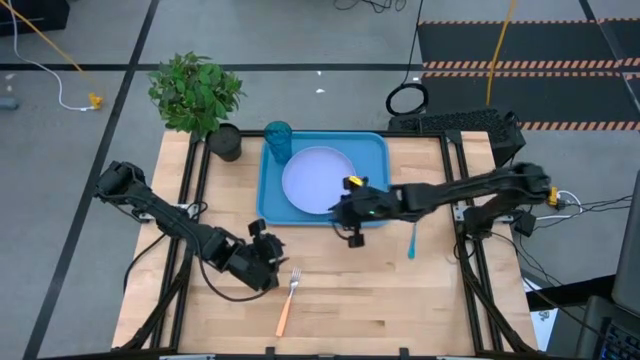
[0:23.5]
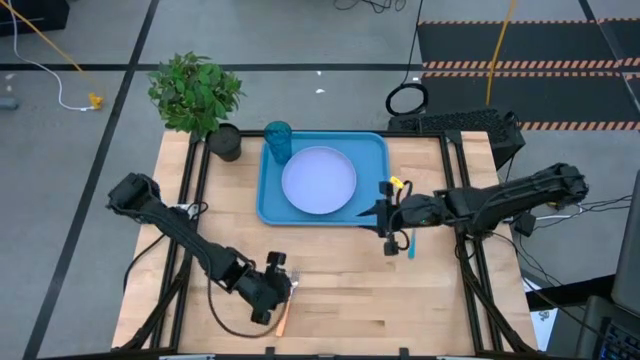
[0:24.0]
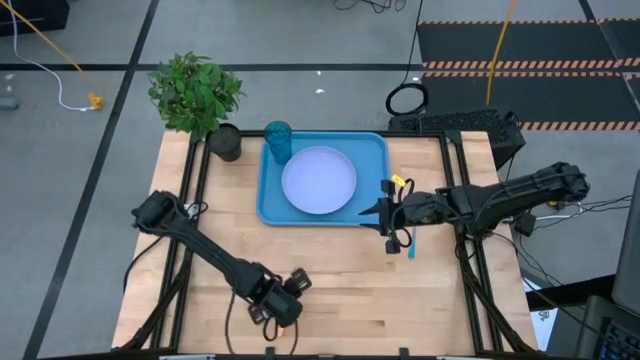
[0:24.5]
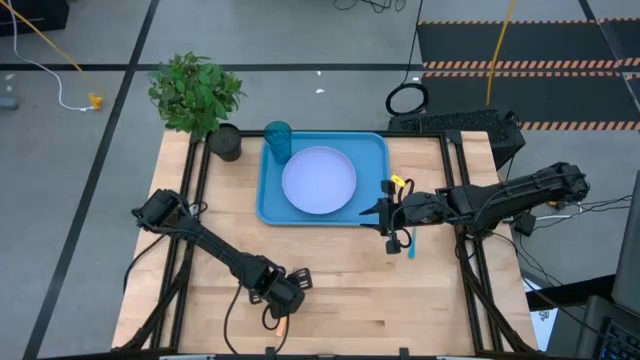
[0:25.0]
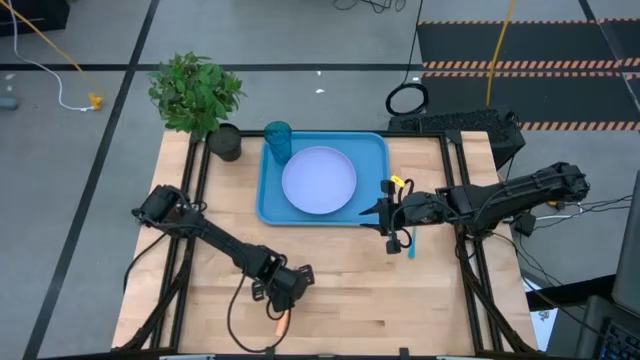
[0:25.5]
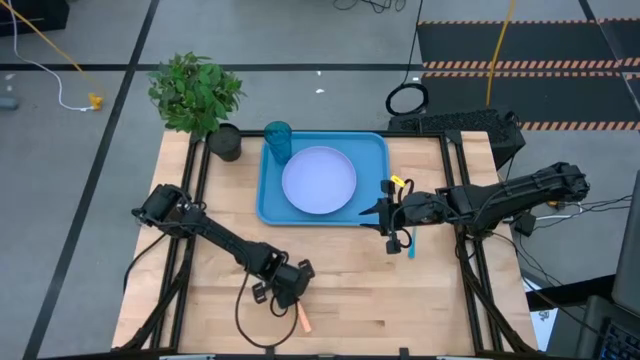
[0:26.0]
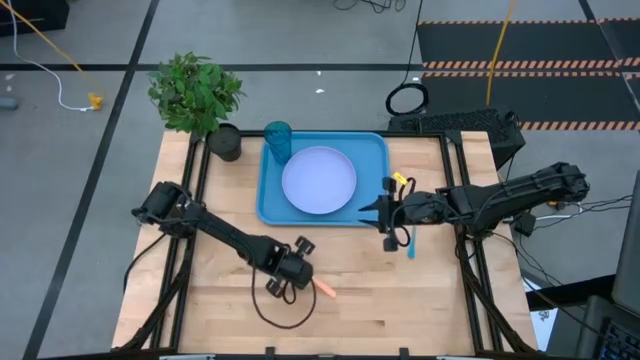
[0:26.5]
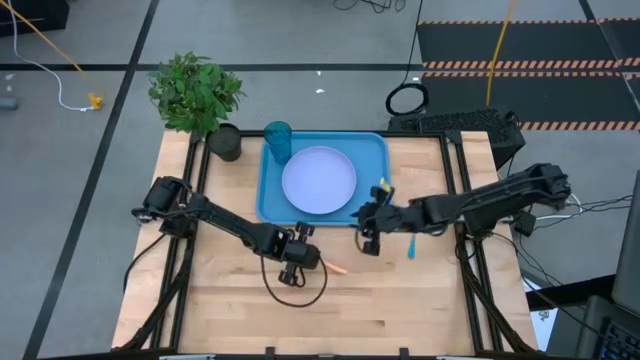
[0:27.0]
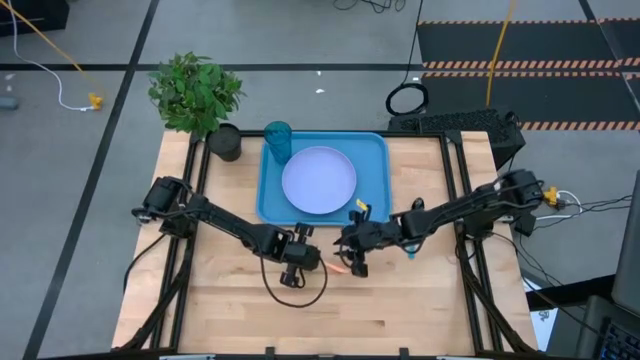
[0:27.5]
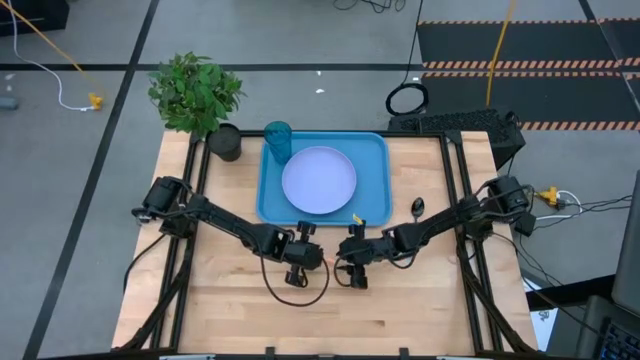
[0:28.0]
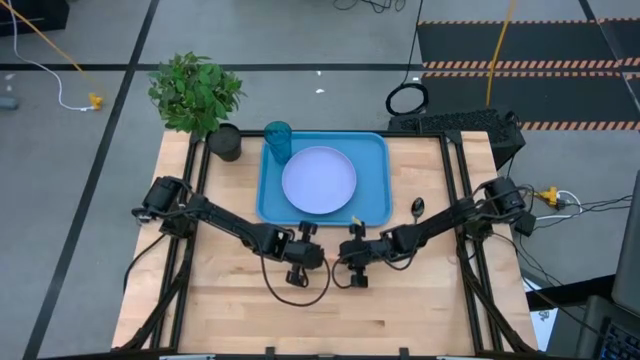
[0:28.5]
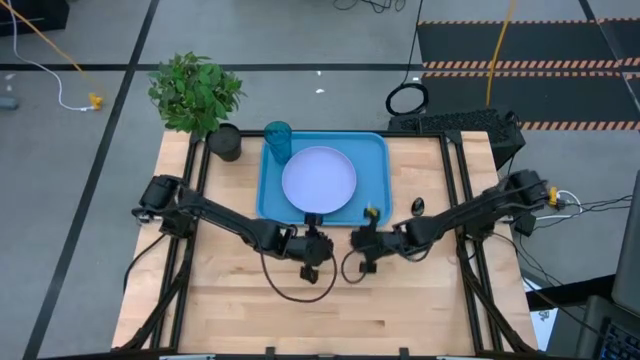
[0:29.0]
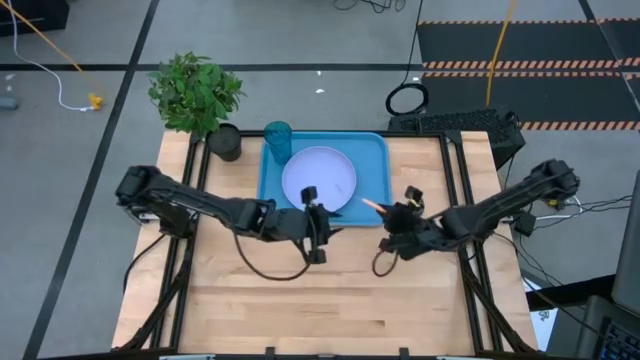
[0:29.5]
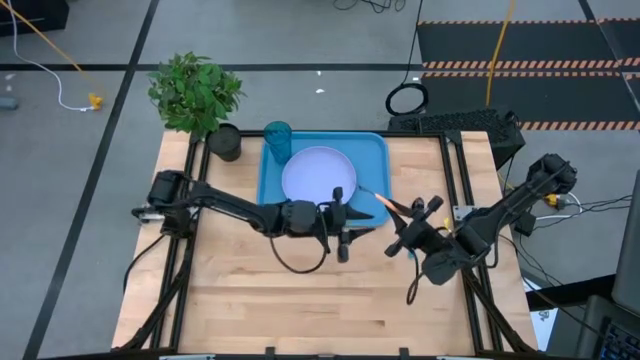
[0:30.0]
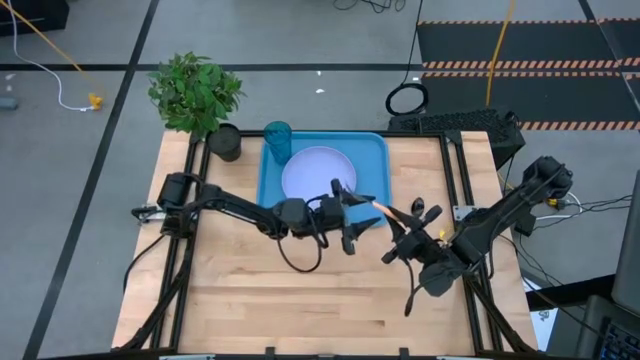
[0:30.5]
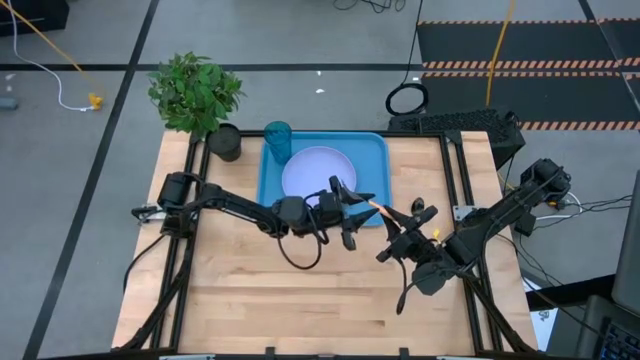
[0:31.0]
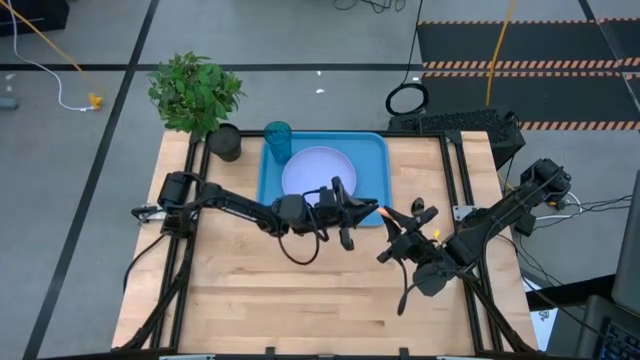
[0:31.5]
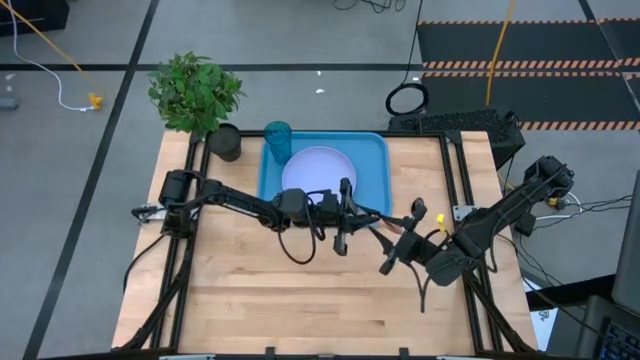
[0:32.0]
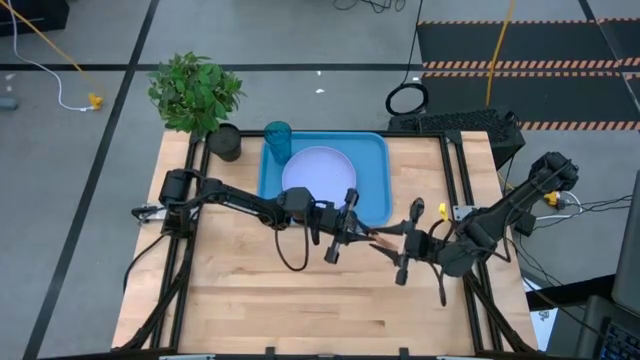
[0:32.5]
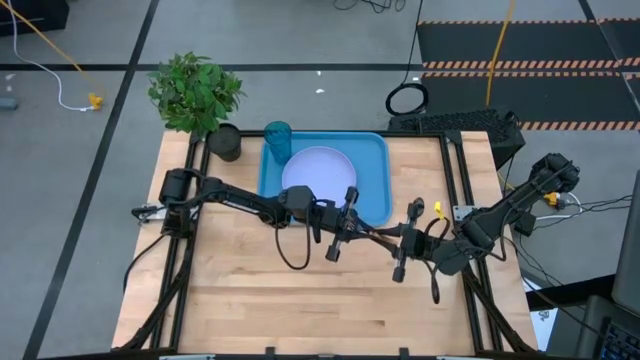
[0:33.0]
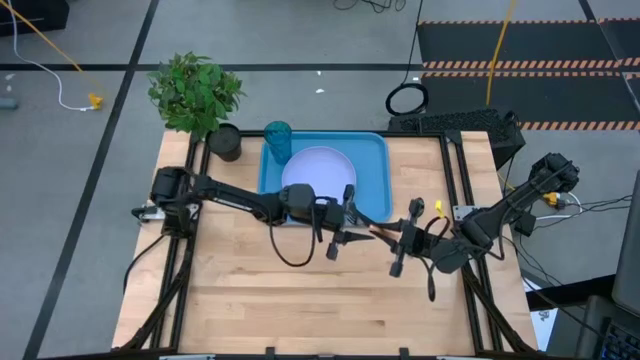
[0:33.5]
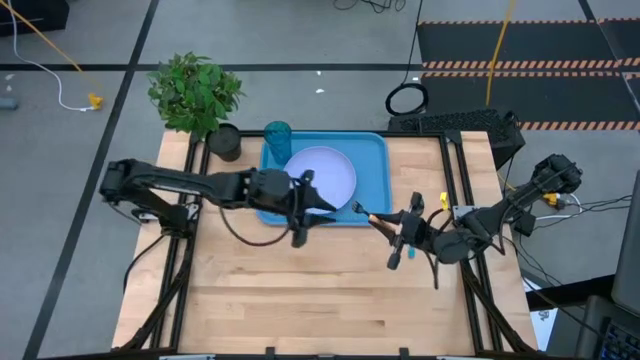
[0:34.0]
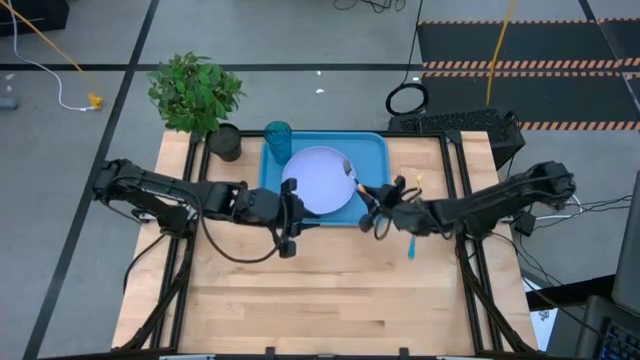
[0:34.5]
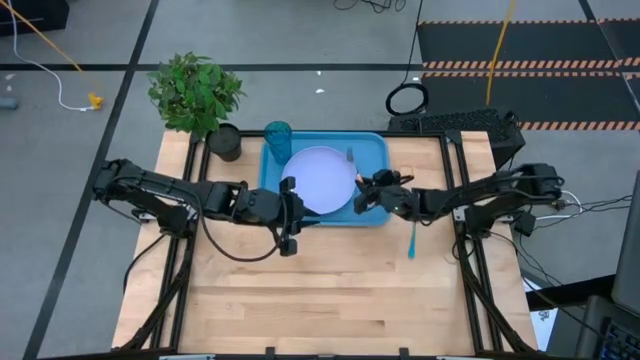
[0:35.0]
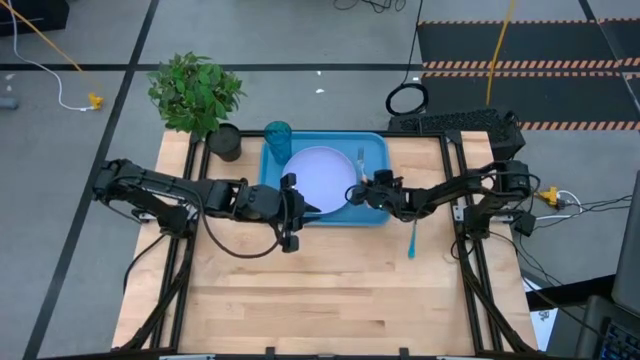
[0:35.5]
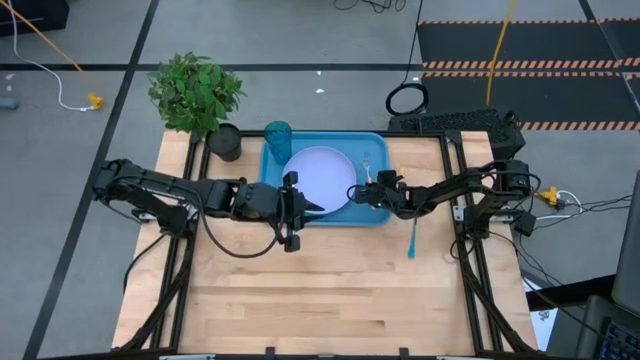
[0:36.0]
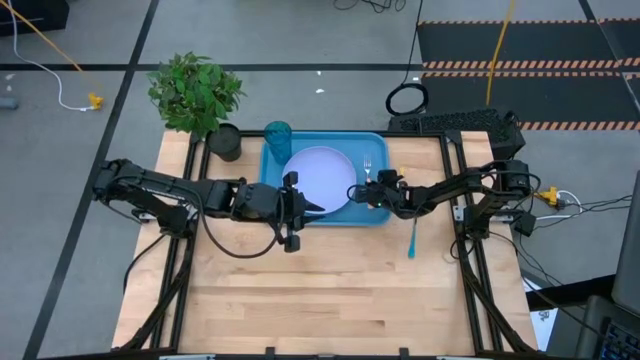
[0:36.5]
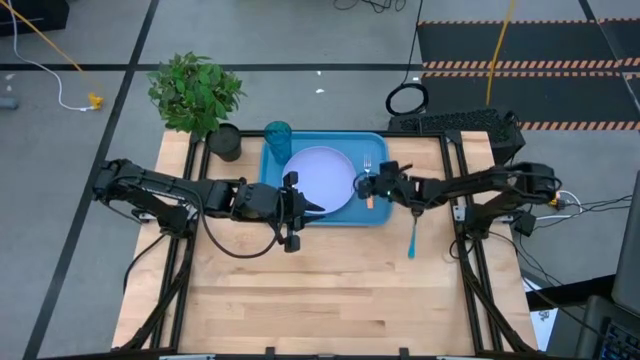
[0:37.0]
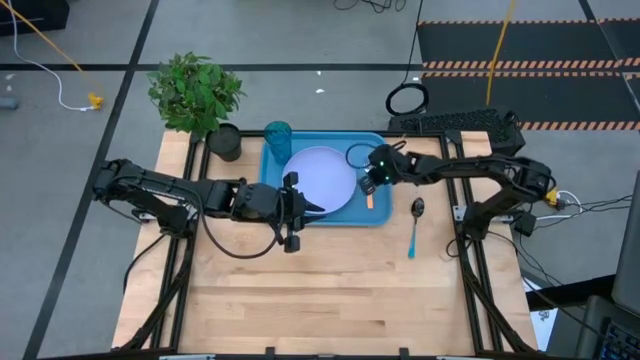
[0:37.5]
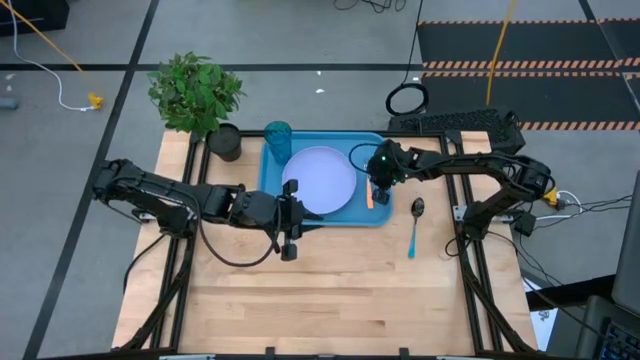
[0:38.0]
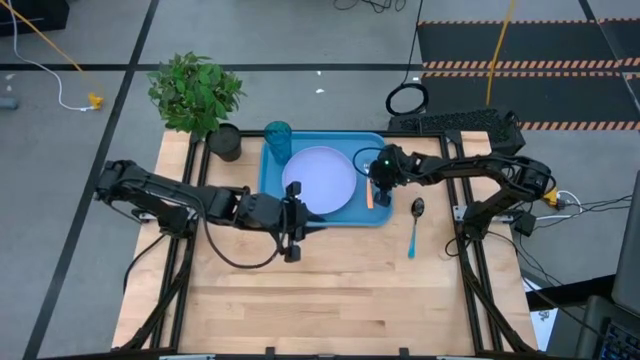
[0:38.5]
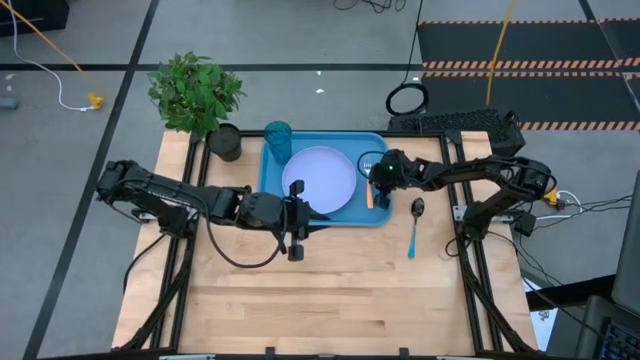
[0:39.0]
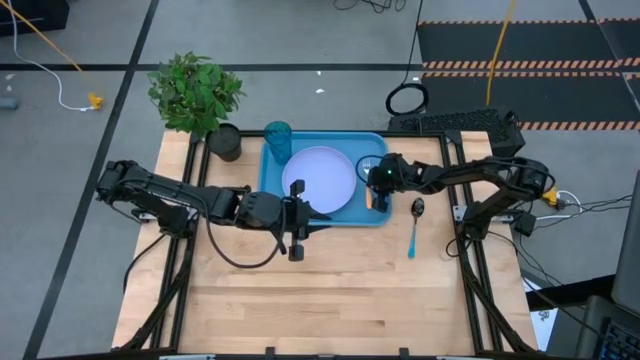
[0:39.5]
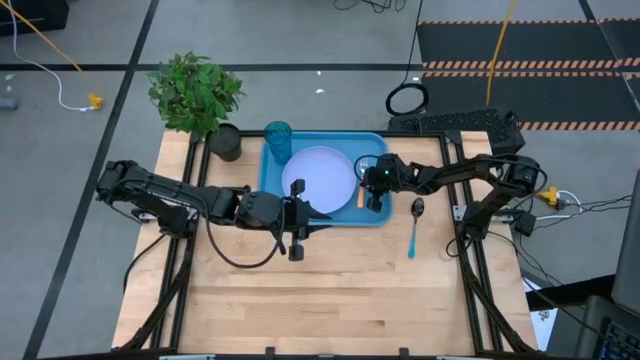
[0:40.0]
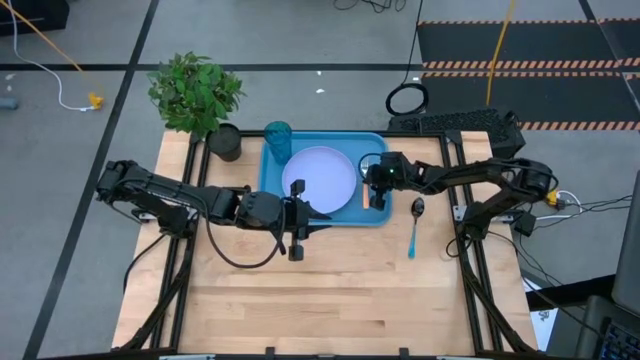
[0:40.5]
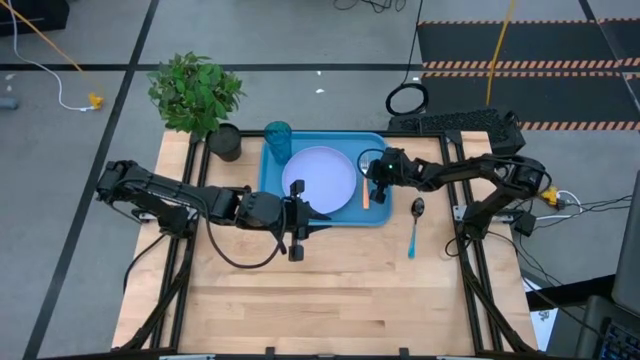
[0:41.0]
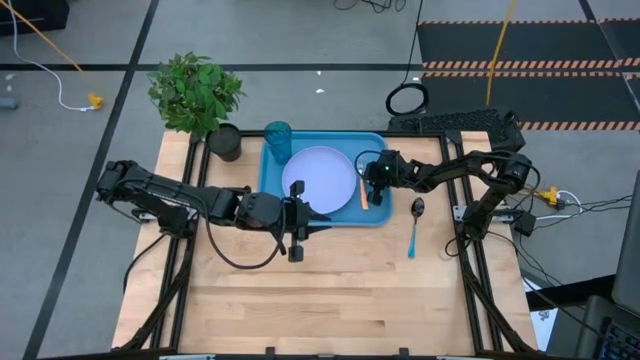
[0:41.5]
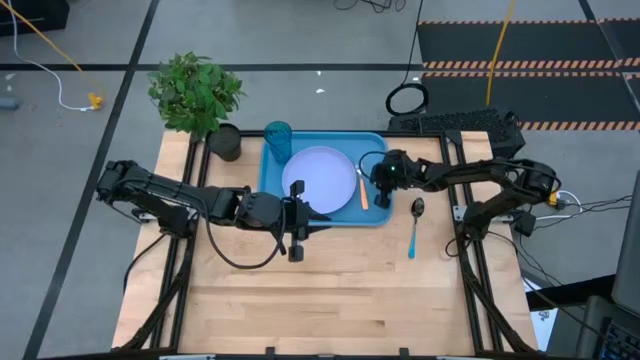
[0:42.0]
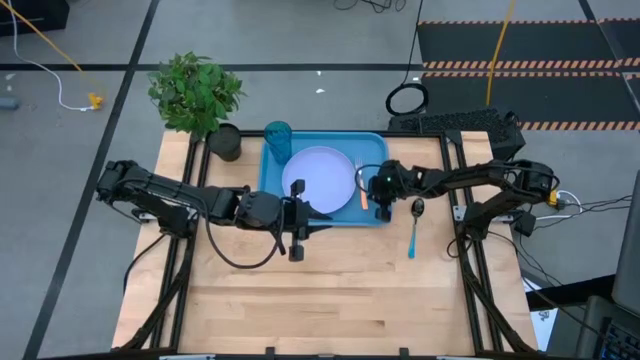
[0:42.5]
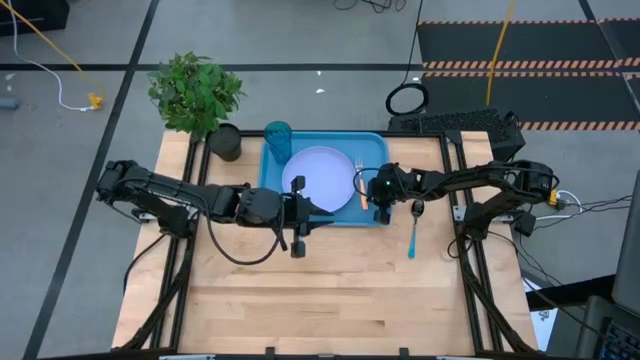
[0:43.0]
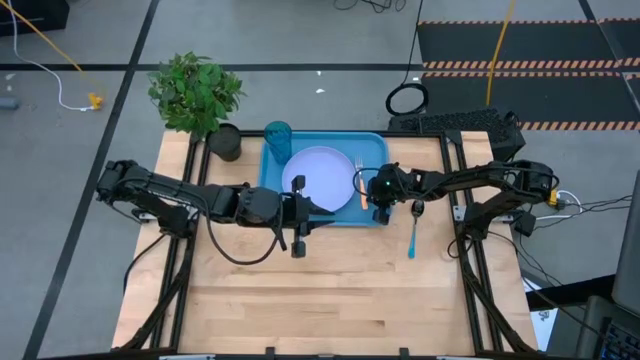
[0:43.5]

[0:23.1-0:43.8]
Task: Pick and place plate/cup/fork/spoon on tray
Put the orange fork on the blue serving tray to the right of the blue plate
